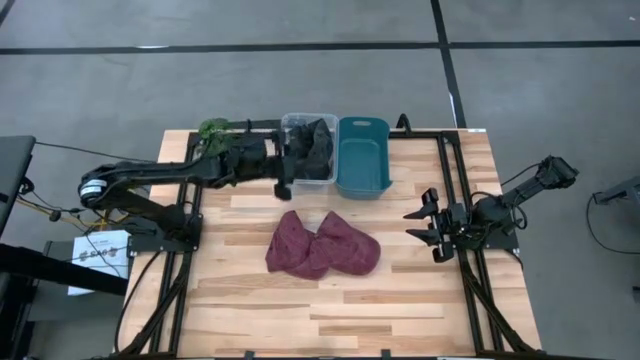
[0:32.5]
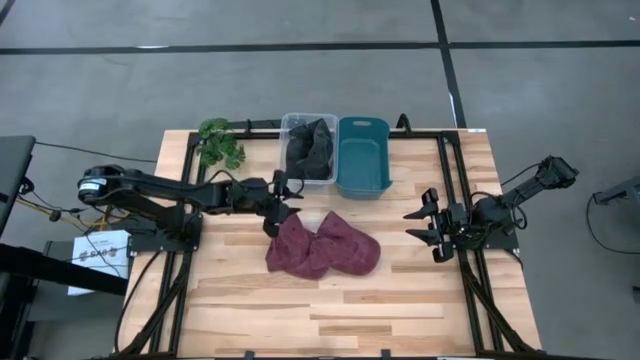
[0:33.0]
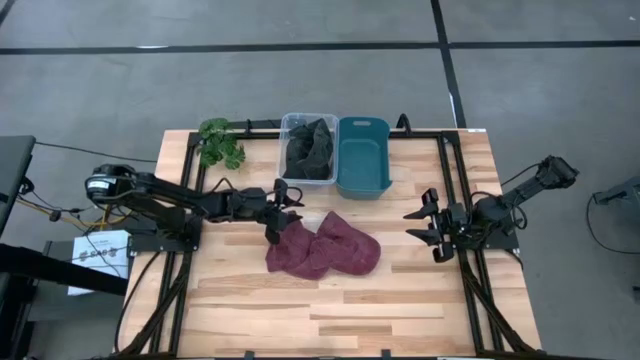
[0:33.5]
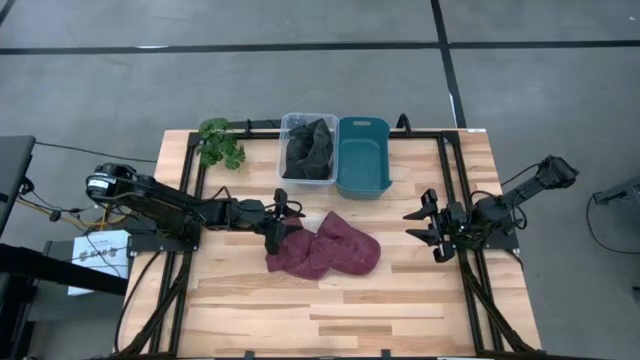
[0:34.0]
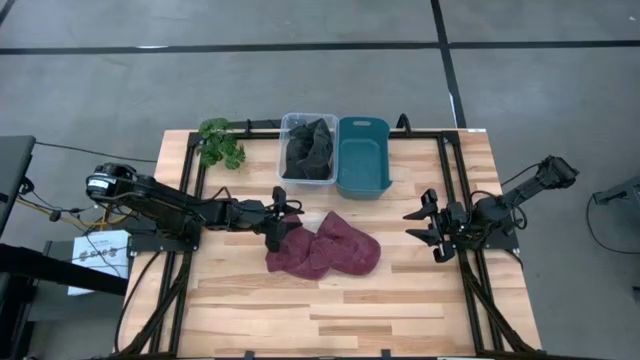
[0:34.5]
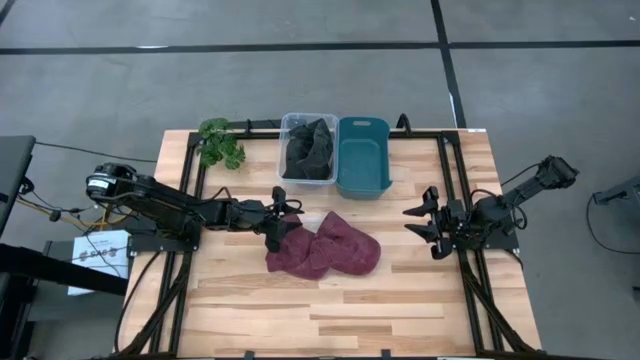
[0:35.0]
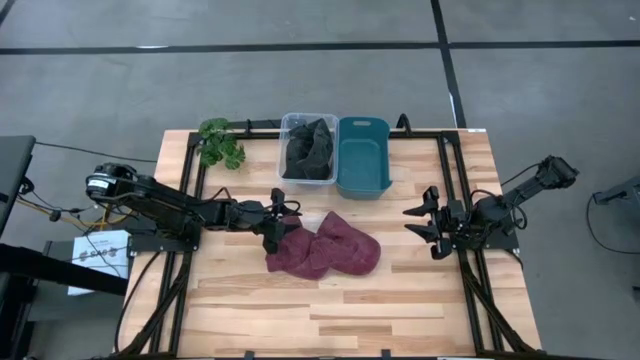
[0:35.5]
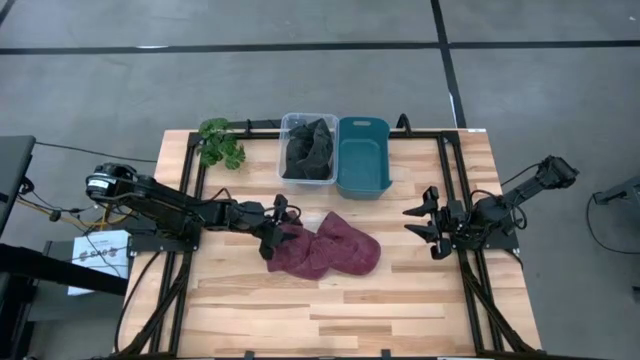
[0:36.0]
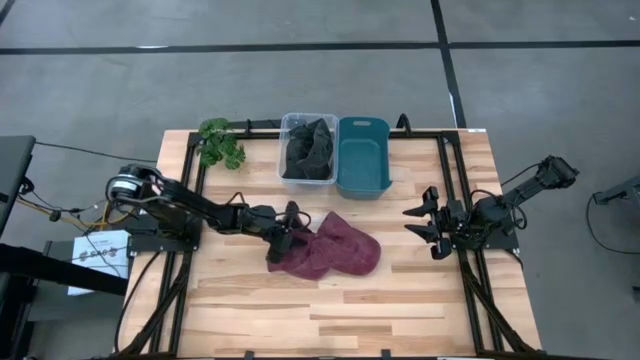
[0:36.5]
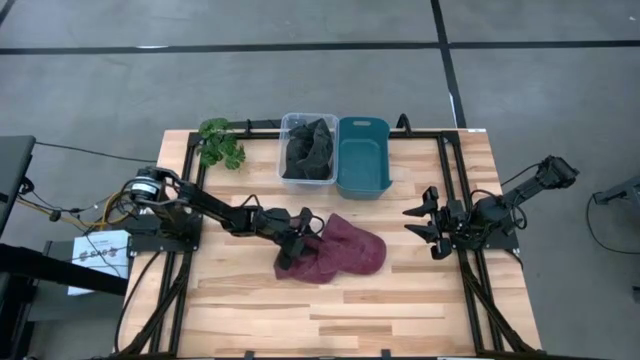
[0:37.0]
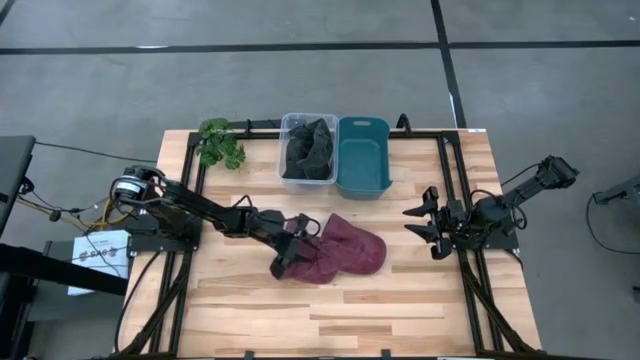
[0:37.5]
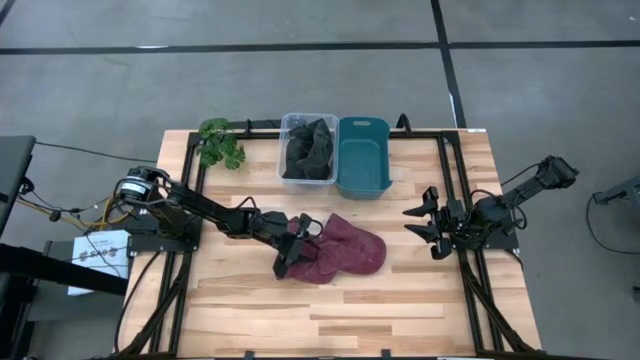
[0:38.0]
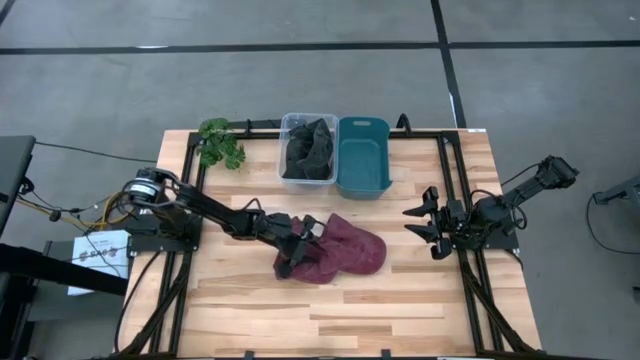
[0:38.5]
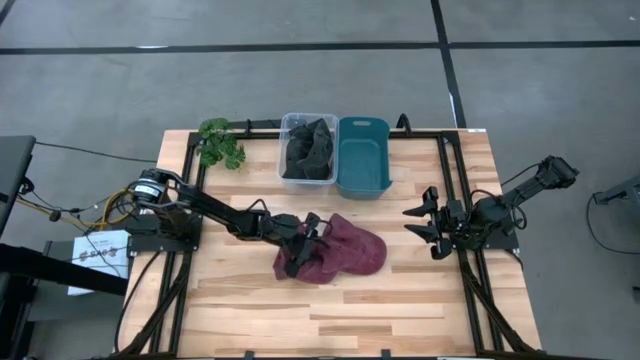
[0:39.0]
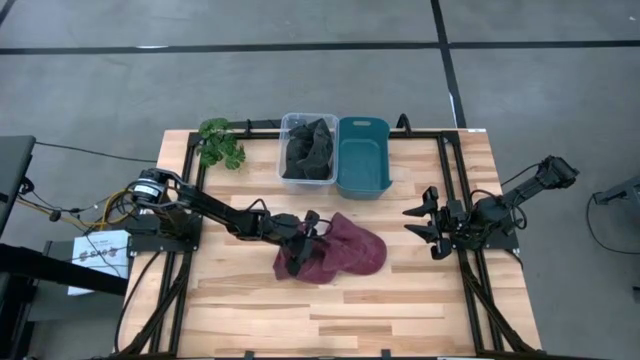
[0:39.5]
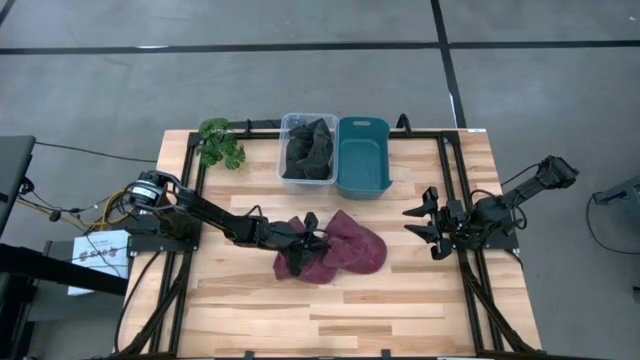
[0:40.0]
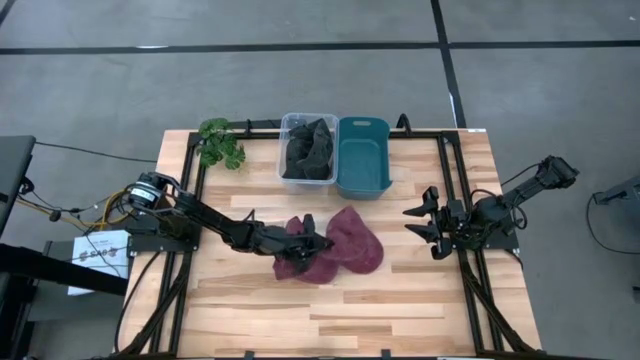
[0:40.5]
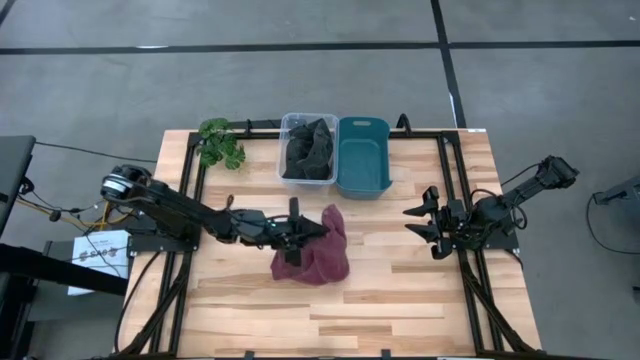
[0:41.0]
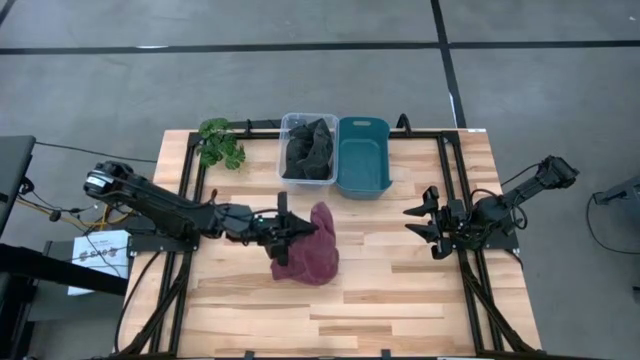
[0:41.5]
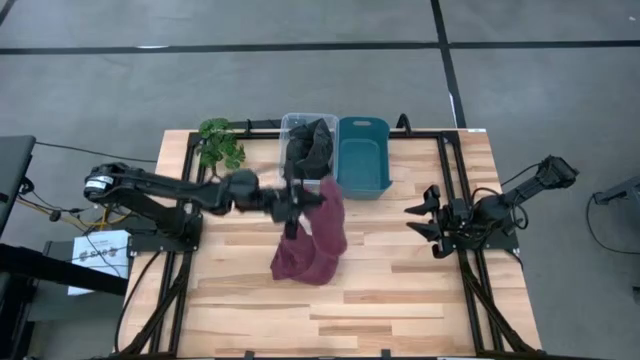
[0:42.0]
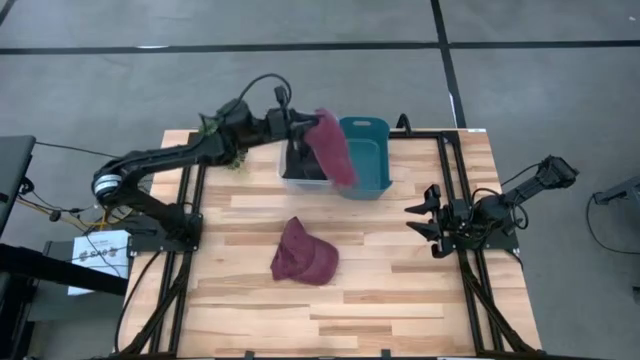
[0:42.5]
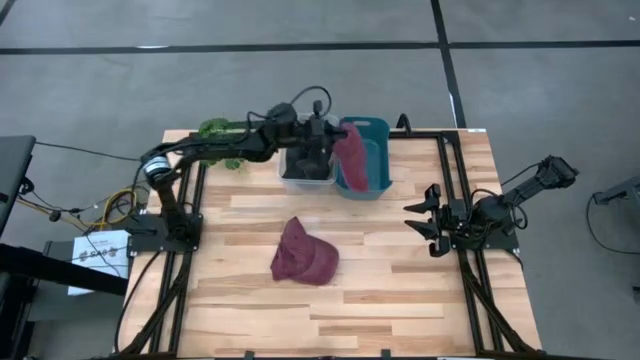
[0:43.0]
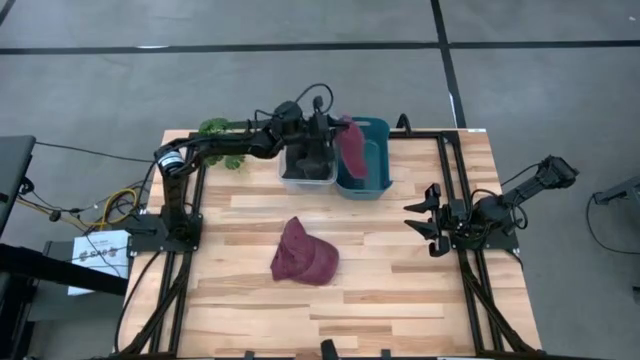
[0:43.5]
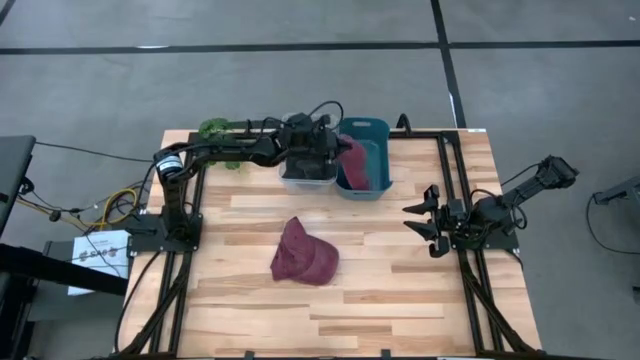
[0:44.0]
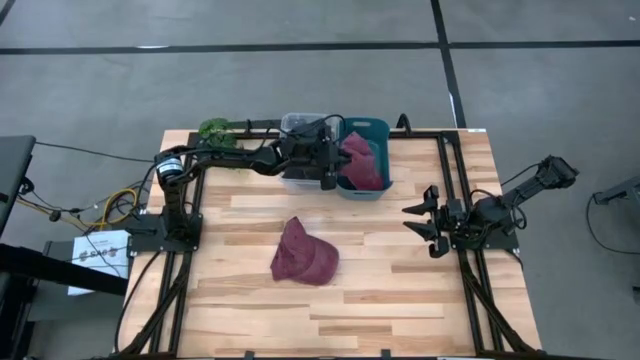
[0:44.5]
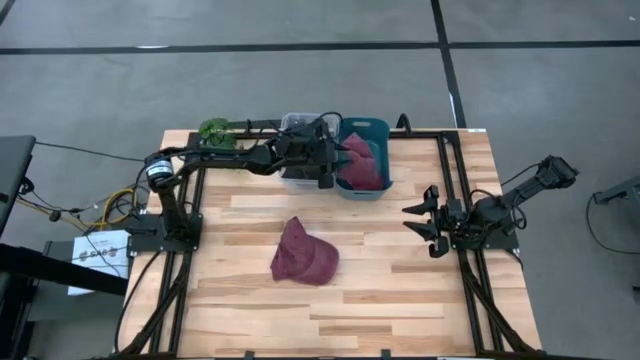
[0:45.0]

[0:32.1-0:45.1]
Task: Pick & Place hat
Put the red cap into the blue bin

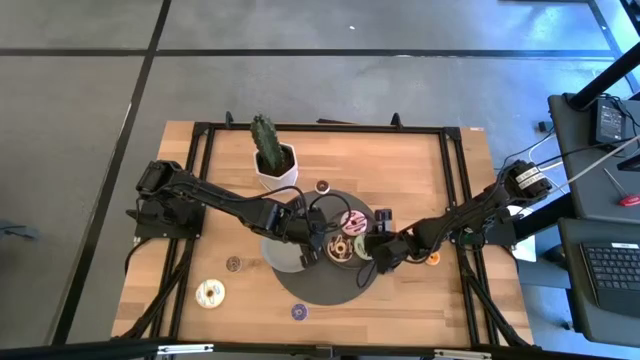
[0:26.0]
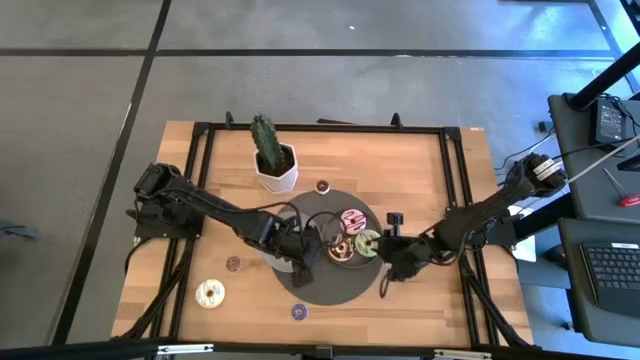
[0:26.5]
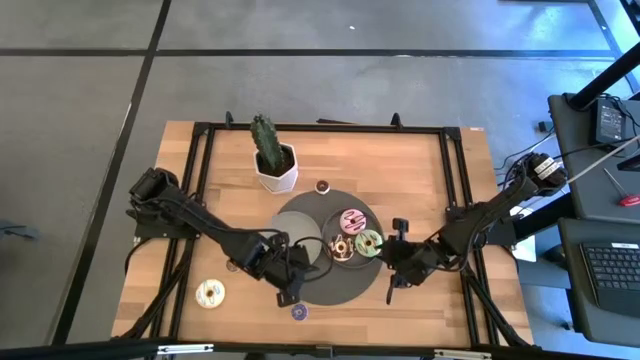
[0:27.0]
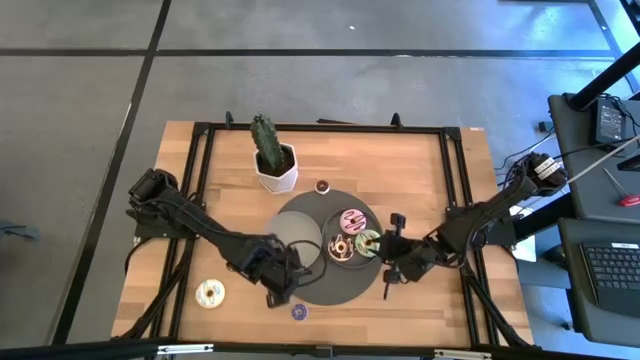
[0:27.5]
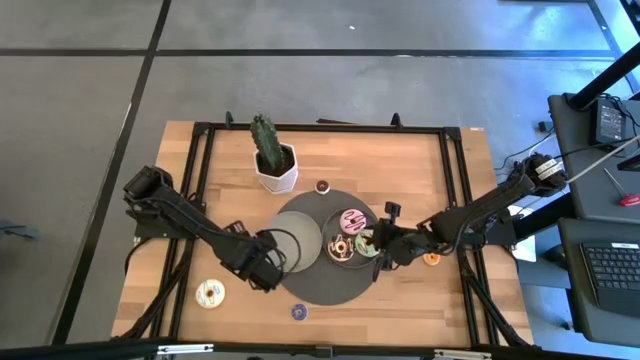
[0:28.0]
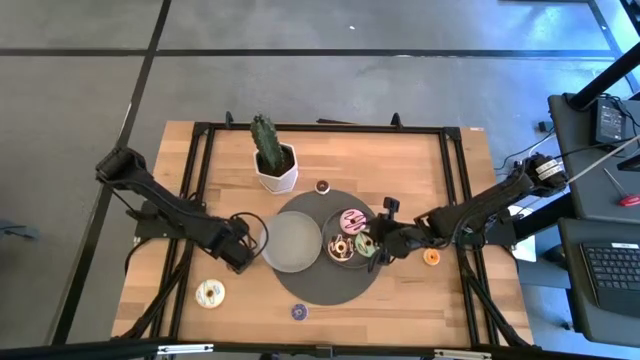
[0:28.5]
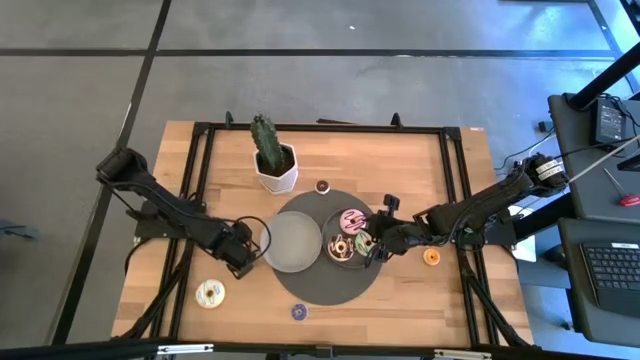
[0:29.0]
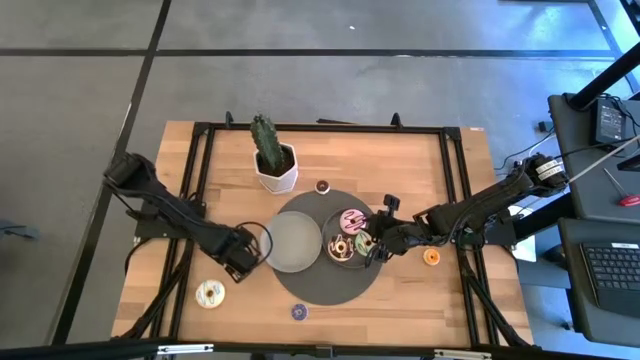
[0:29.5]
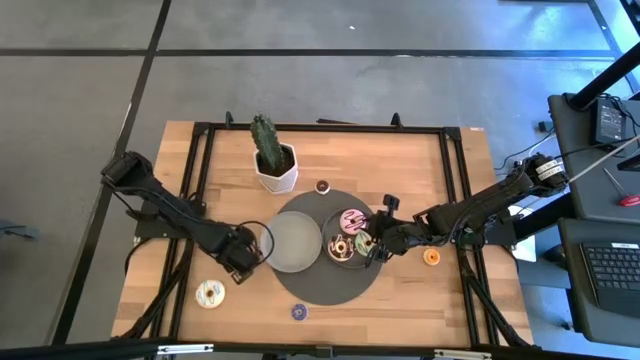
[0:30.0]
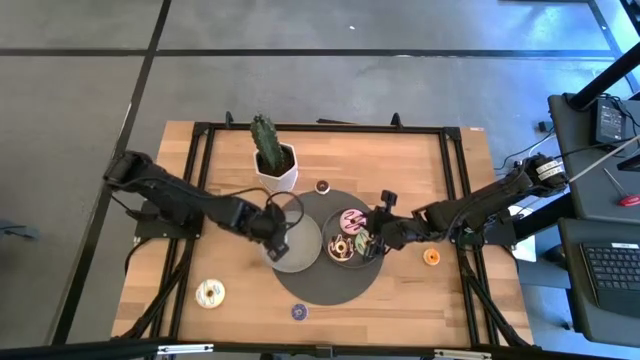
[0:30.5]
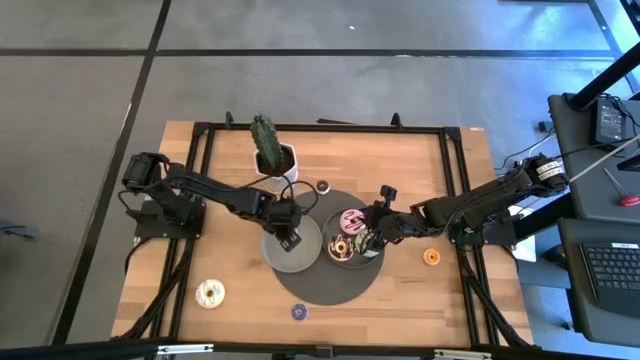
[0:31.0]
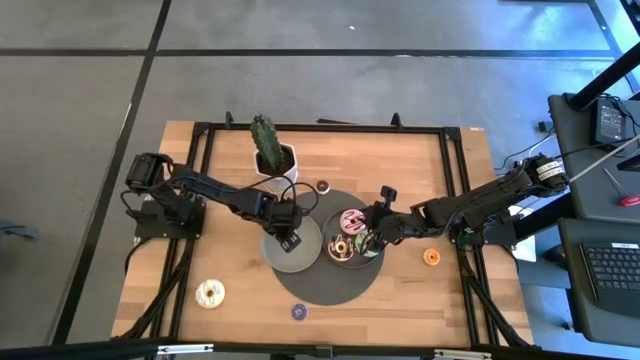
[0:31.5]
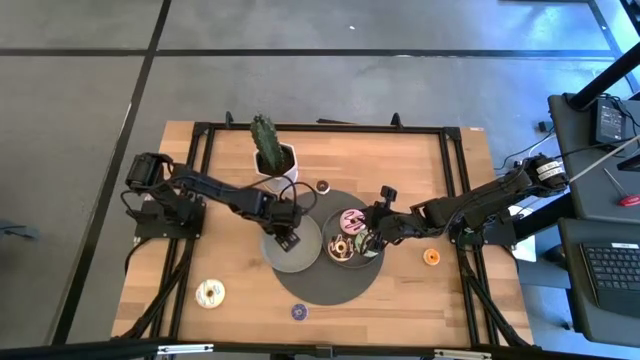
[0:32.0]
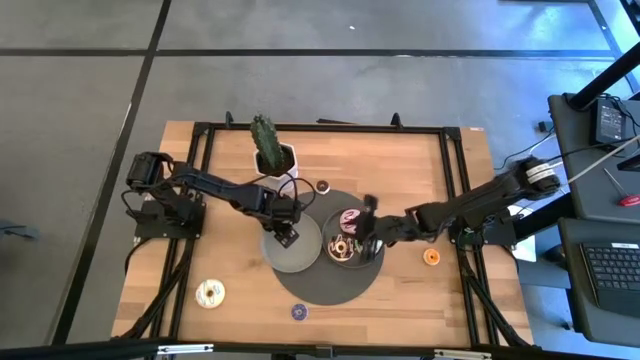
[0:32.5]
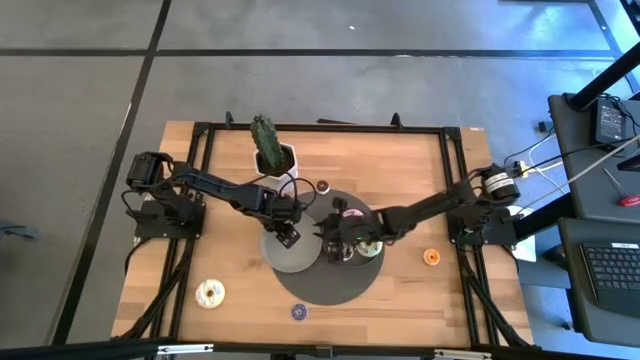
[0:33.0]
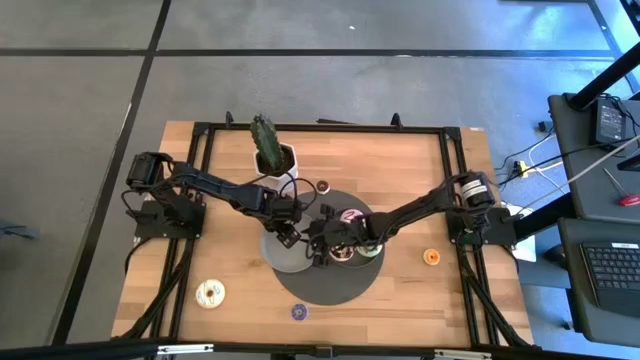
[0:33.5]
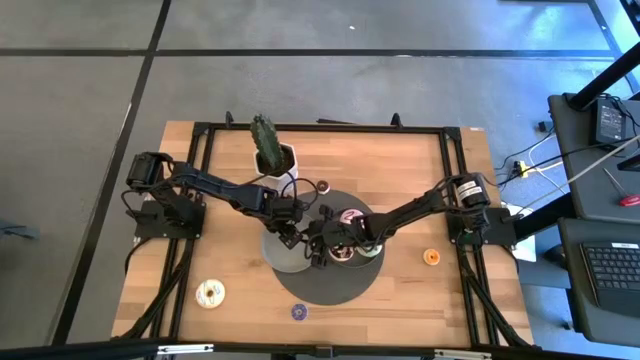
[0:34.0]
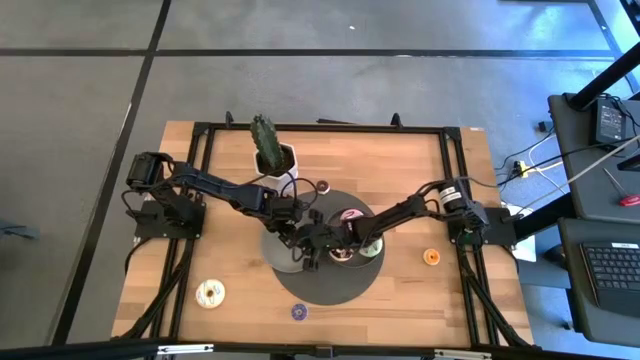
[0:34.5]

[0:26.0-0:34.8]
Task: Pick & Place donuts
Put the small brown donut on the gray plate
